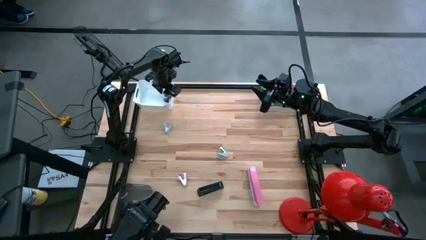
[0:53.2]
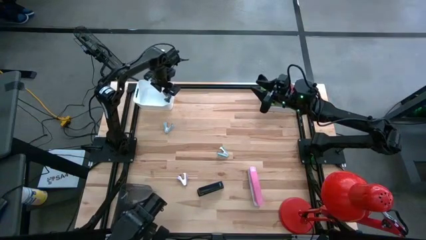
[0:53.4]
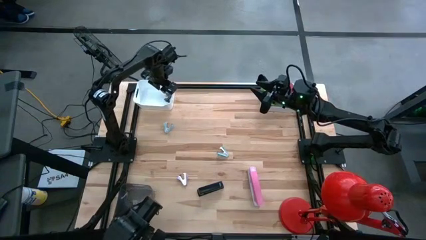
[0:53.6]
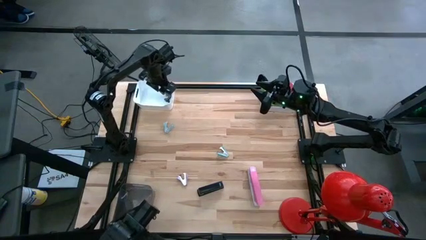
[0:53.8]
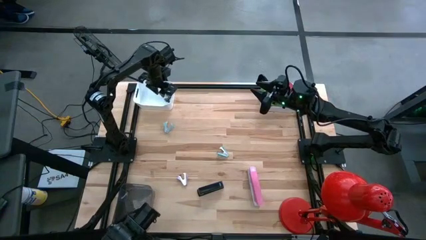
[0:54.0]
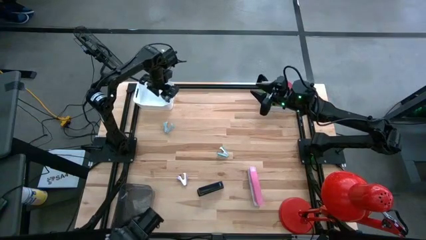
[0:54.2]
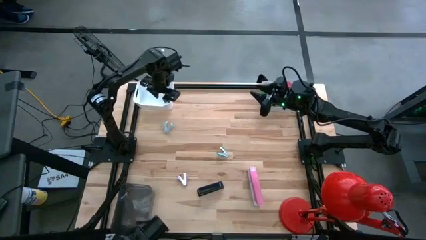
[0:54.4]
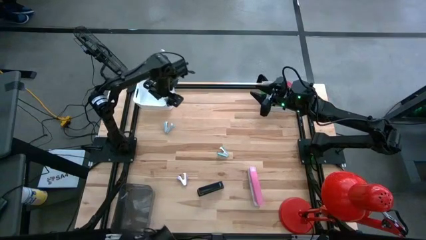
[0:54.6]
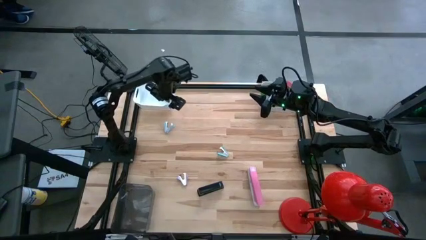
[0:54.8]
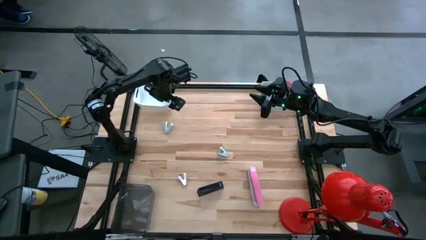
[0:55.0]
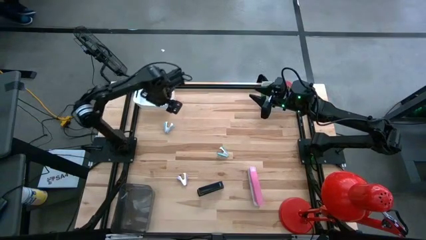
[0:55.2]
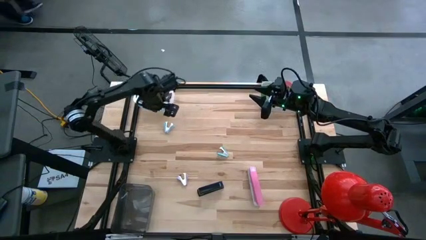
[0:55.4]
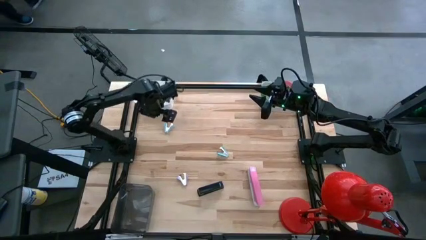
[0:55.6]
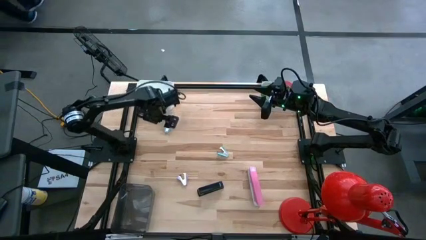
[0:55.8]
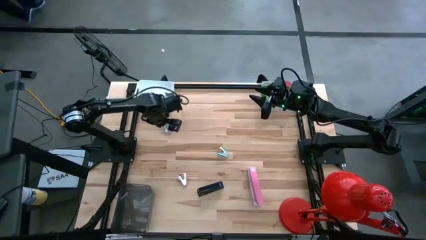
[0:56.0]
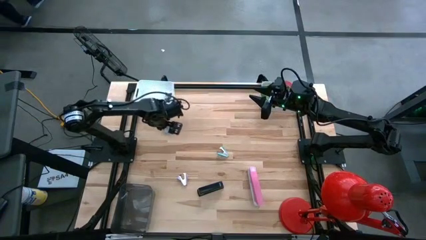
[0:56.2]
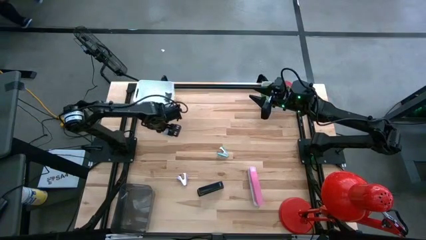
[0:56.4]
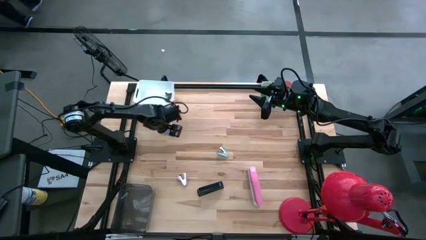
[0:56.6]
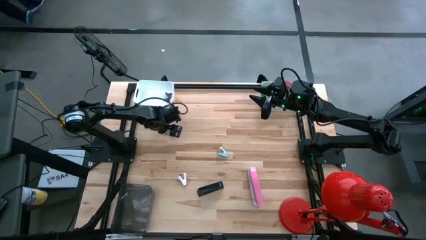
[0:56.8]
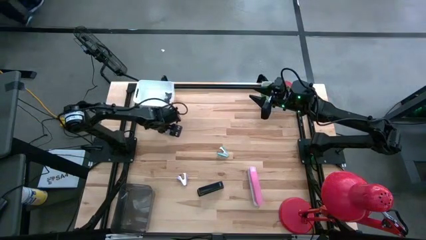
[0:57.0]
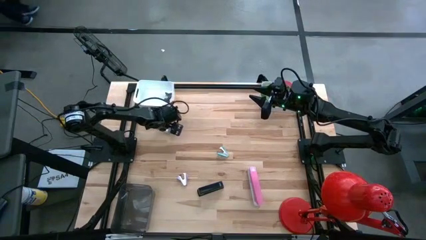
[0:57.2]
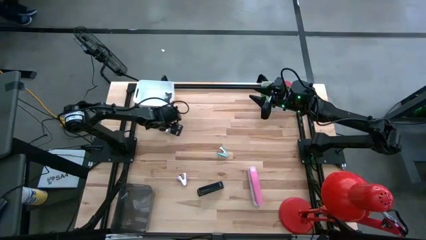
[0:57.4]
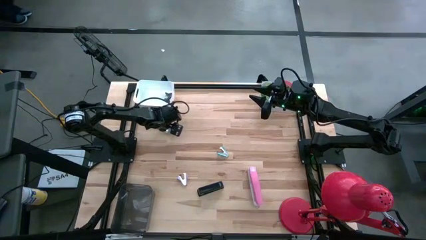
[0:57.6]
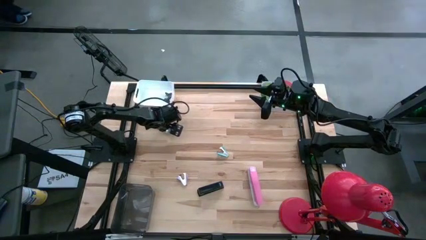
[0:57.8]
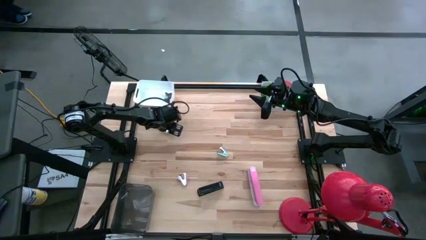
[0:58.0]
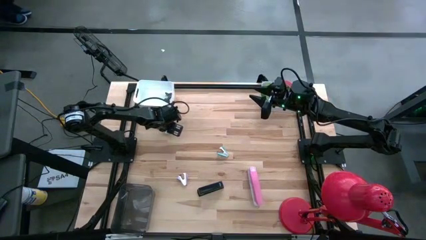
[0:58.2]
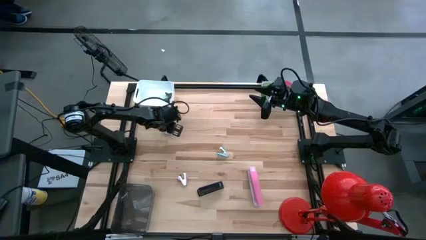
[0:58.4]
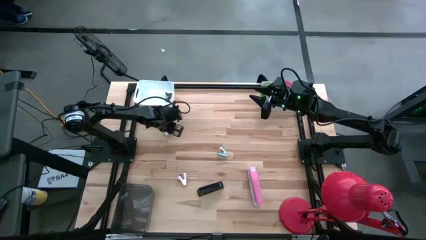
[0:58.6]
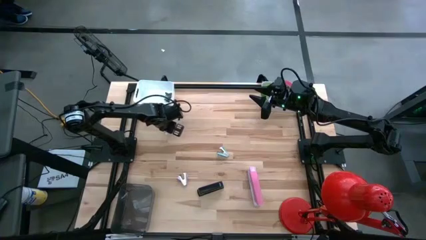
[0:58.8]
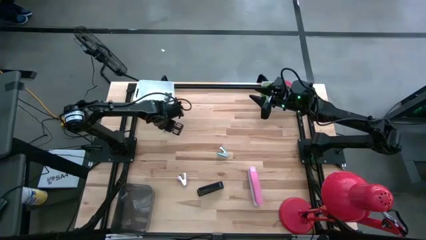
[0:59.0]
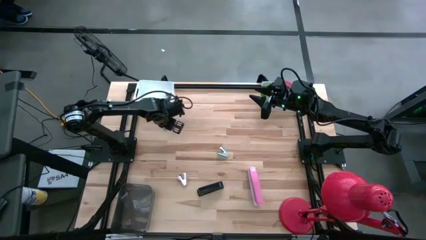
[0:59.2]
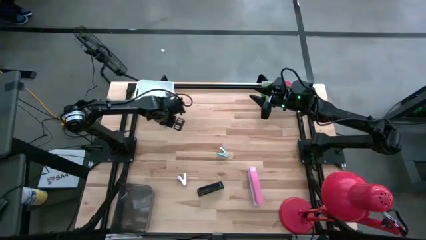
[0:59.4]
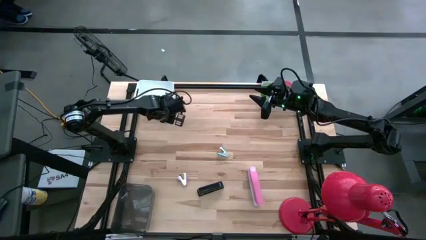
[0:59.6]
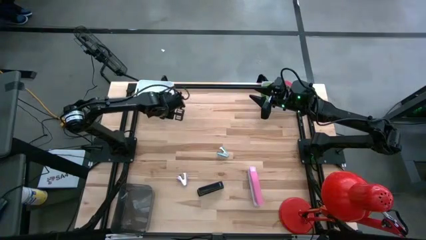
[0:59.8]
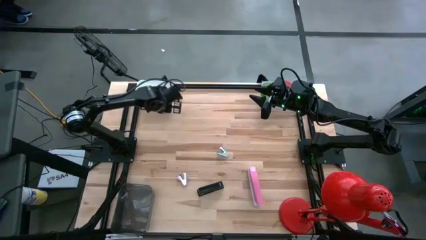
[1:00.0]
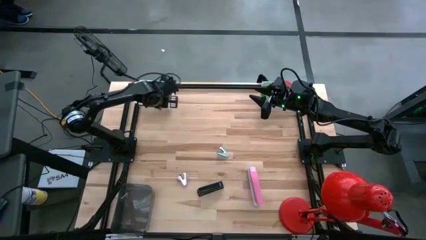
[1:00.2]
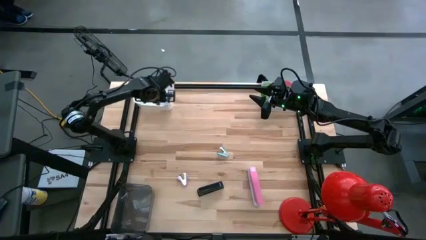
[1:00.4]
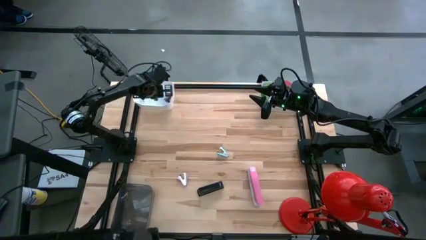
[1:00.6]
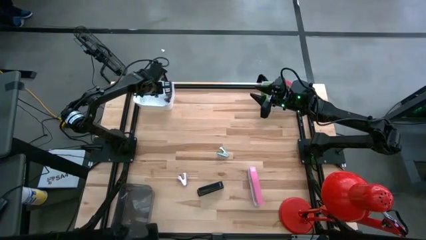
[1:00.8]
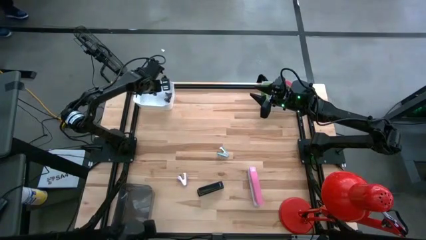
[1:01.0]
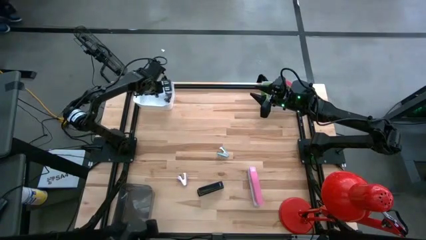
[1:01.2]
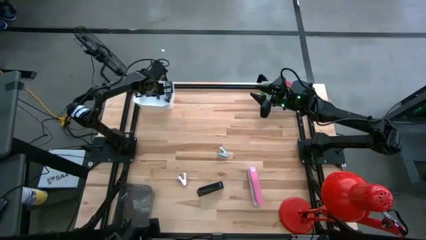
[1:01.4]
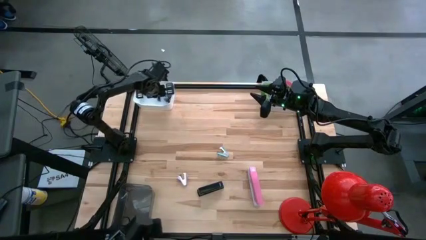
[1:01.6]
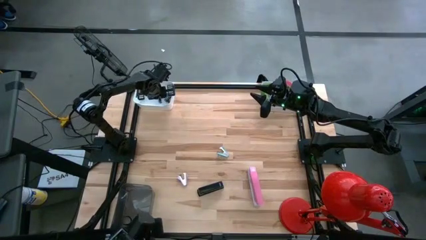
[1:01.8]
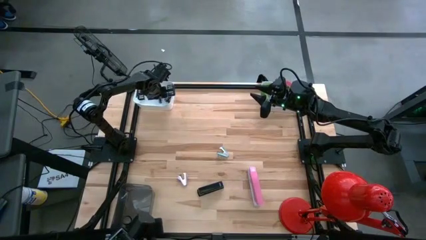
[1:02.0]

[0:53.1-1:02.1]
Task: Pick and place Stapler, Stapler remover, tape
Put the blue staple remover into the left white bin

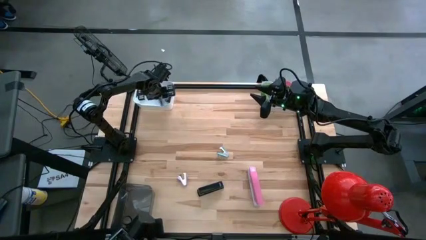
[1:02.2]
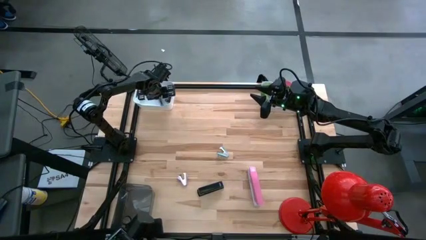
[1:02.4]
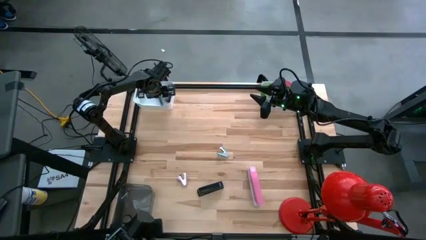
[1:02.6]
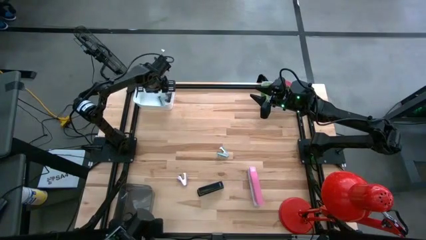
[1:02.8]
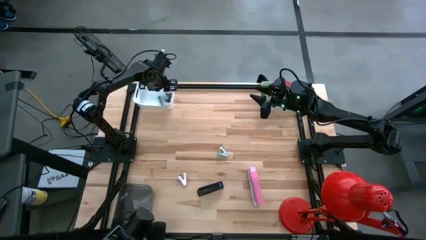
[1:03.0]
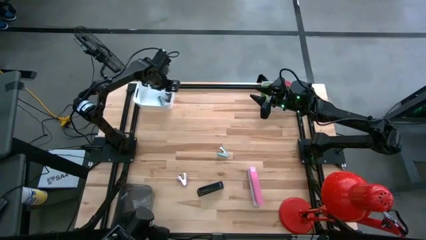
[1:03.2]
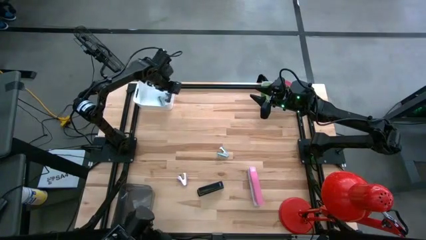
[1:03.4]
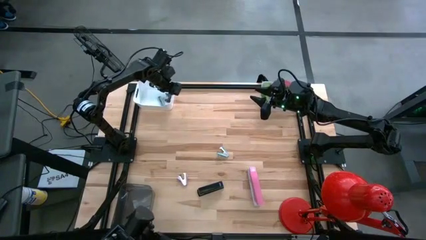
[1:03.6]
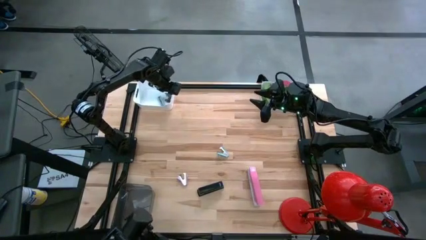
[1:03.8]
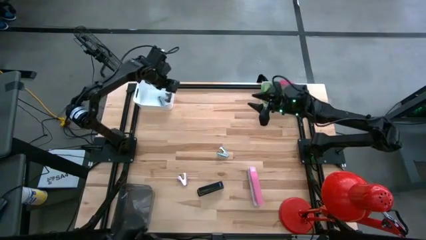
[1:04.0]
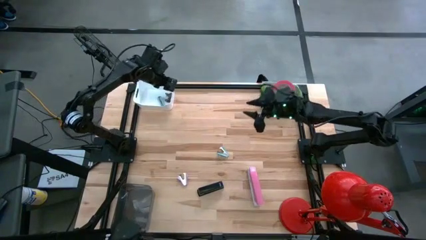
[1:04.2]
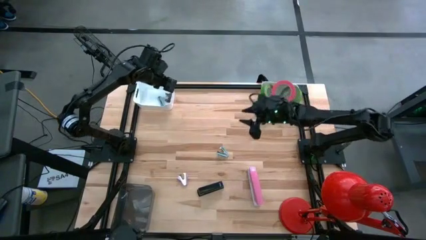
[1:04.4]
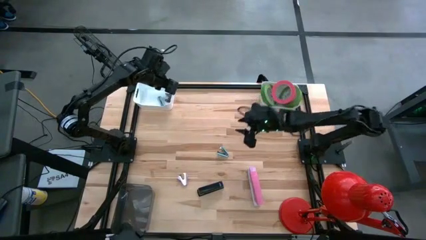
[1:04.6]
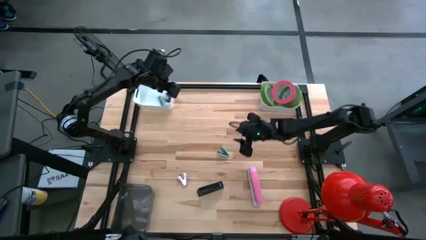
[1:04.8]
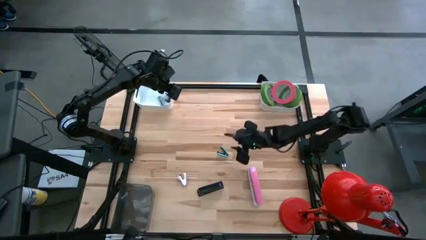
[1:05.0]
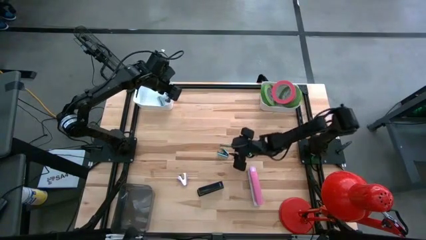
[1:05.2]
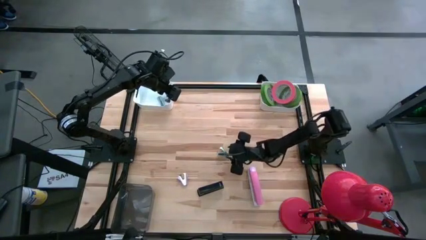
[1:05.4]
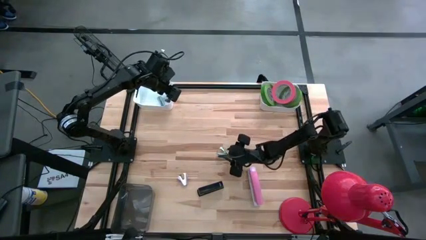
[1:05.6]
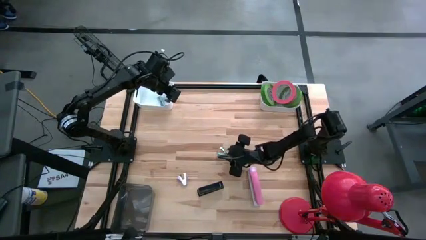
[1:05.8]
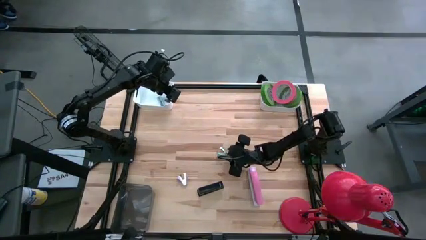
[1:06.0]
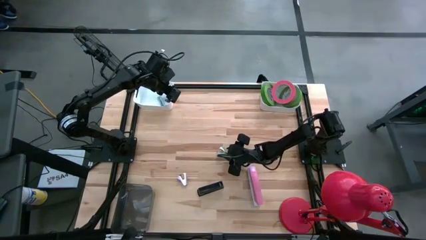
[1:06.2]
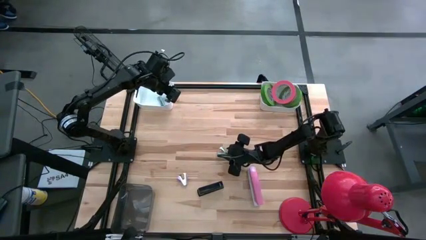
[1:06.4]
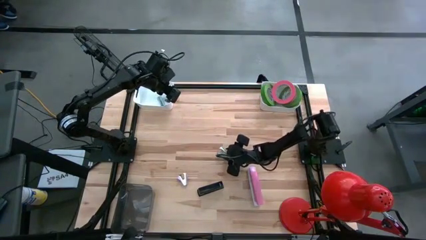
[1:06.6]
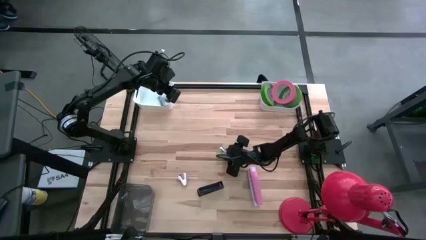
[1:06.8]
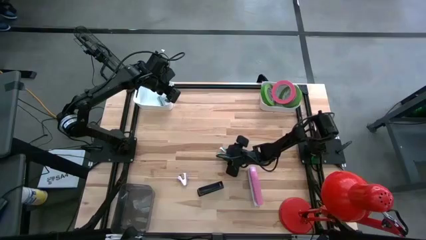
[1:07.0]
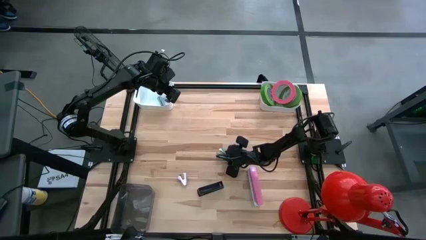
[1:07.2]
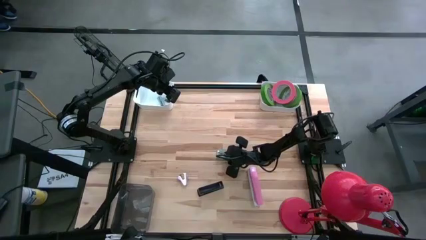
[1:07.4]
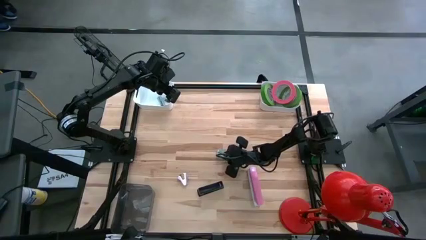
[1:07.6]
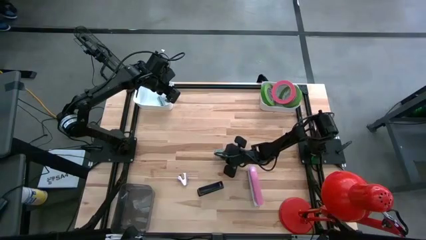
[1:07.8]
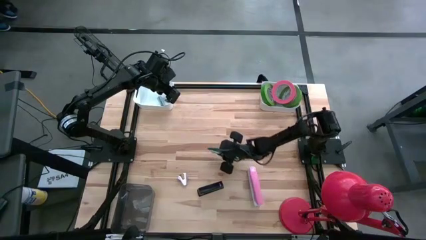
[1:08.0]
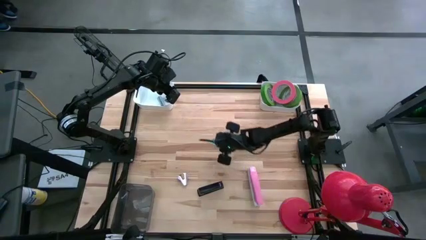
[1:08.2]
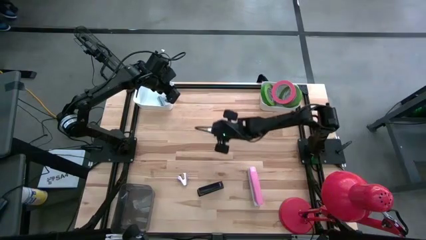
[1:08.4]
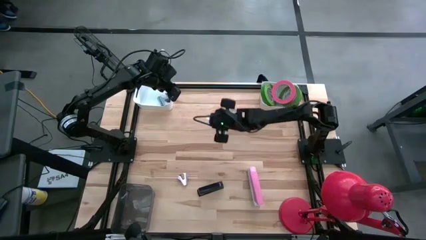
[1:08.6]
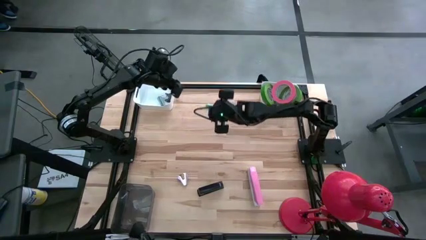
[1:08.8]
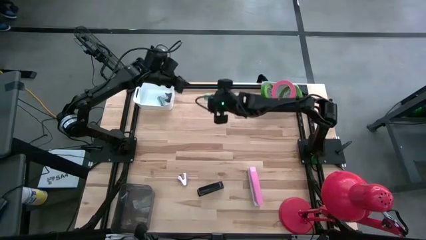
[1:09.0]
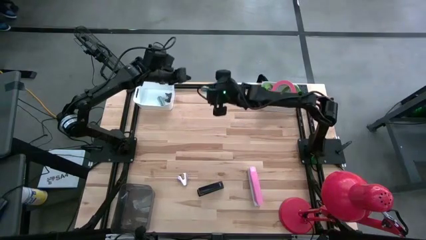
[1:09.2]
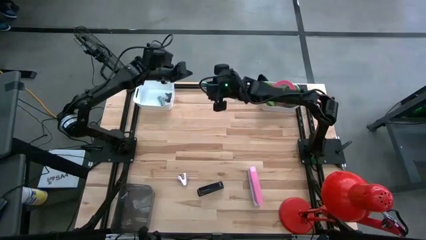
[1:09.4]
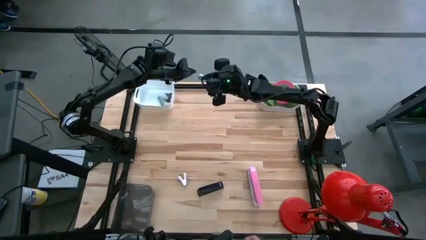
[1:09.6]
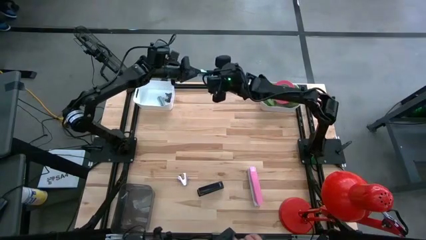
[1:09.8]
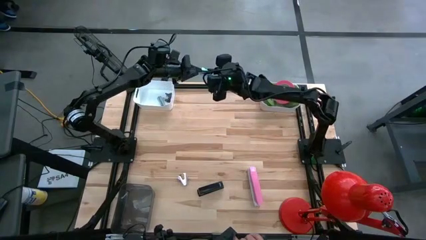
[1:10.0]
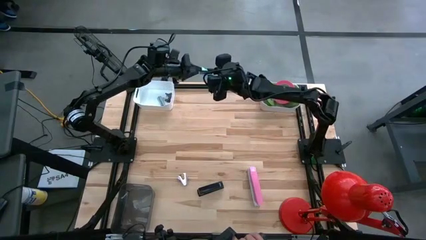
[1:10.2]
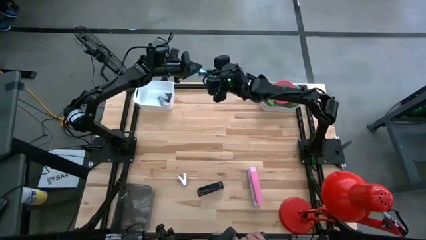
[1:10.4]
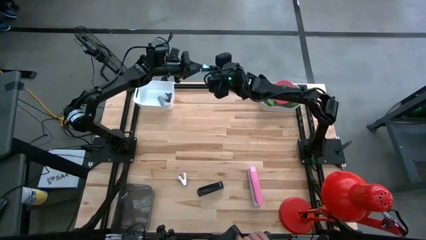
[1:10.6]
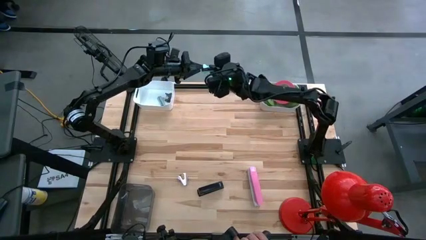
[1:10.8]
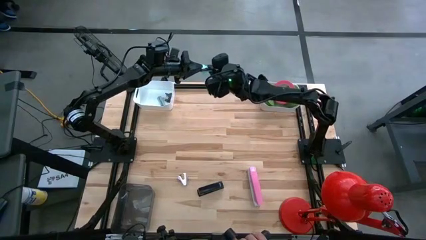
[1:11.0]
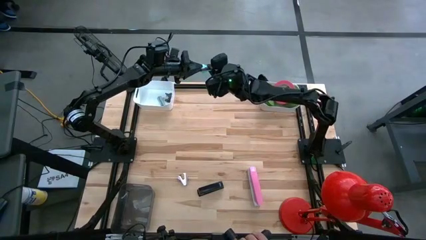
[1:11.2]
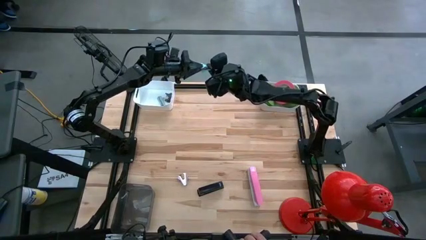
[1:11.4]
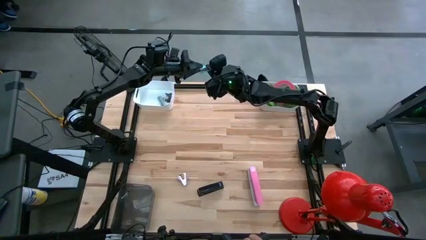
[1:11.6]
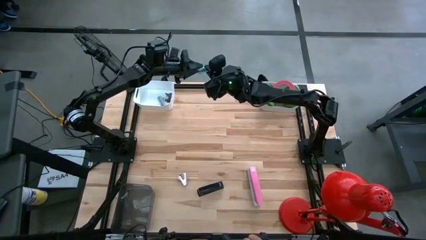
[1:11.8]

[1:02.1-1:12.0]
Put the light green staple remover into the left white bin
